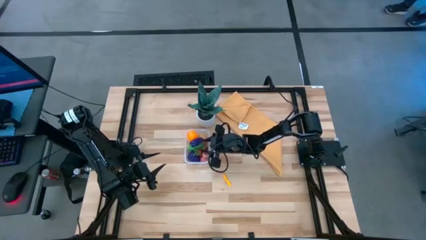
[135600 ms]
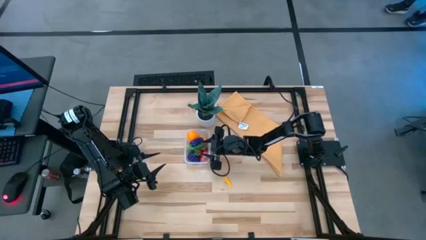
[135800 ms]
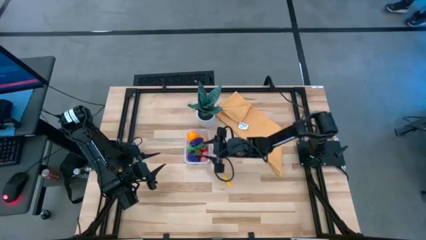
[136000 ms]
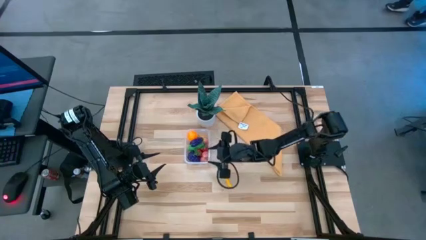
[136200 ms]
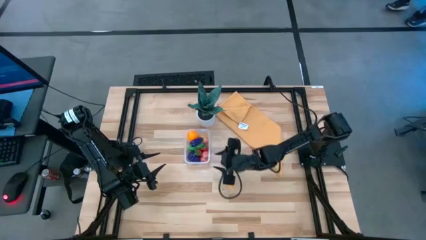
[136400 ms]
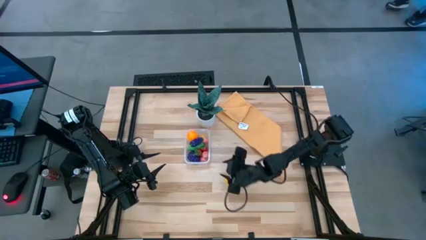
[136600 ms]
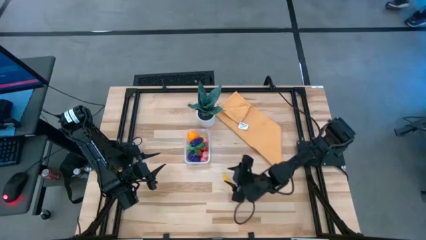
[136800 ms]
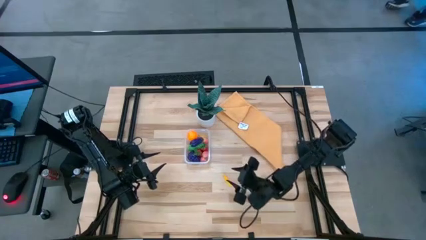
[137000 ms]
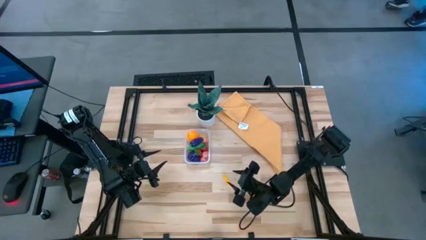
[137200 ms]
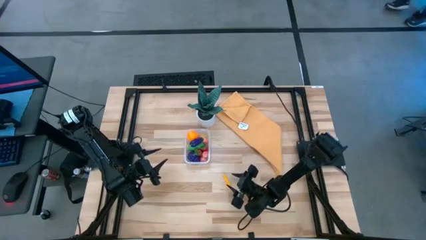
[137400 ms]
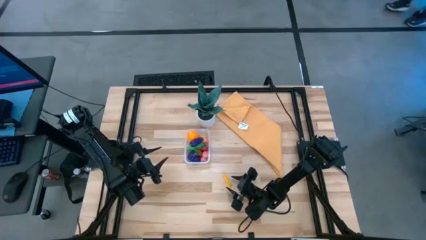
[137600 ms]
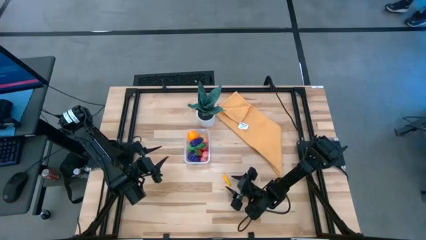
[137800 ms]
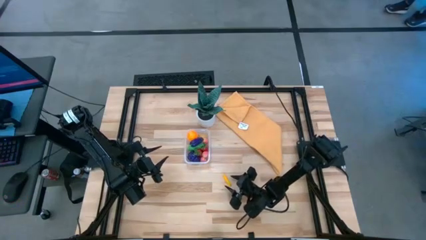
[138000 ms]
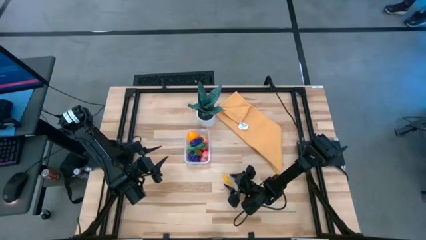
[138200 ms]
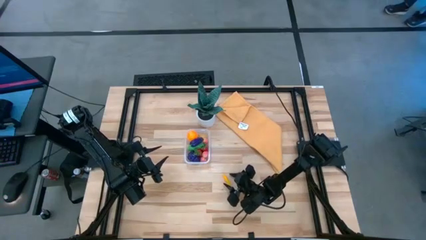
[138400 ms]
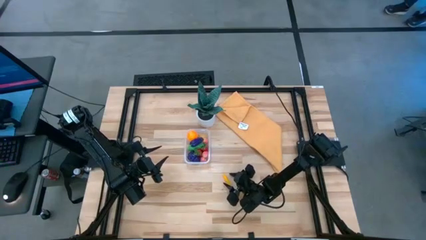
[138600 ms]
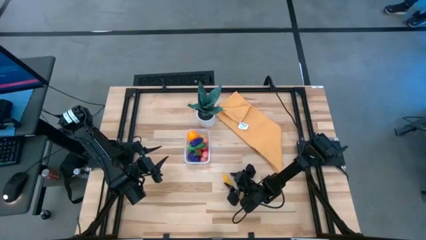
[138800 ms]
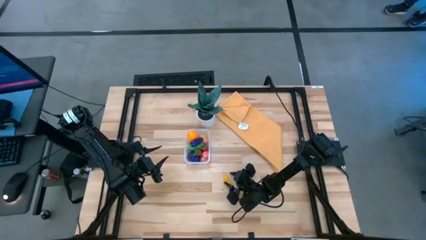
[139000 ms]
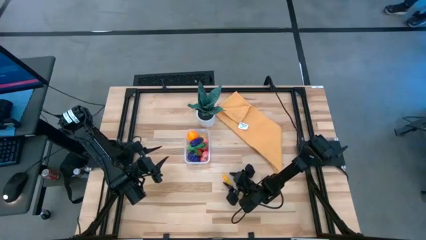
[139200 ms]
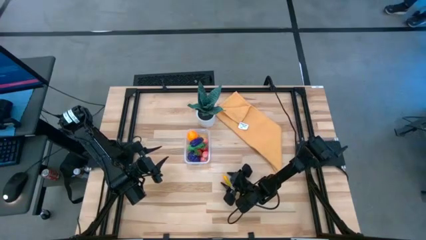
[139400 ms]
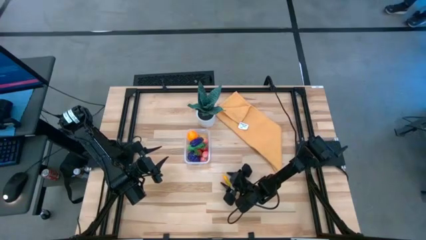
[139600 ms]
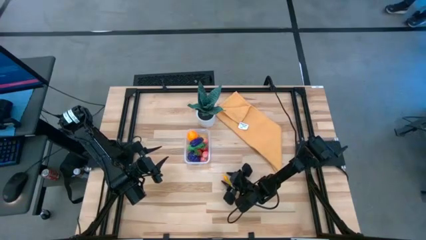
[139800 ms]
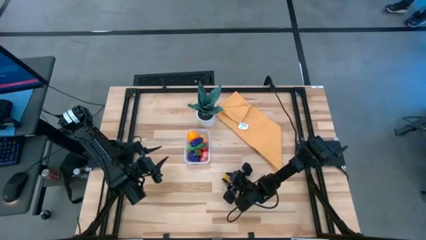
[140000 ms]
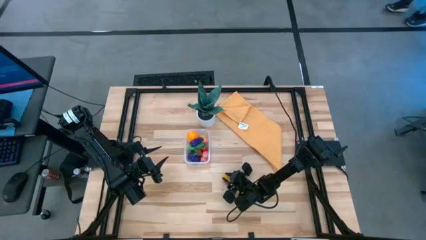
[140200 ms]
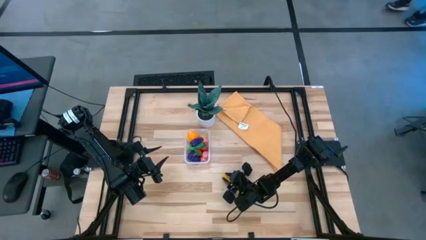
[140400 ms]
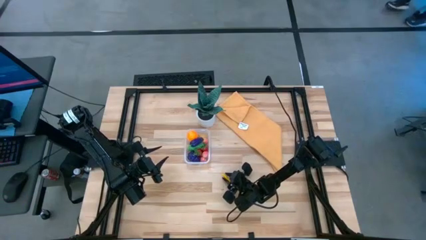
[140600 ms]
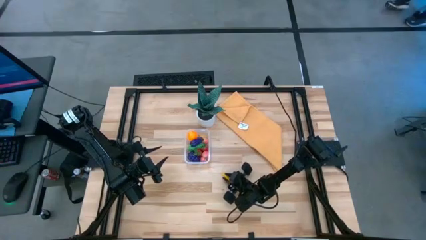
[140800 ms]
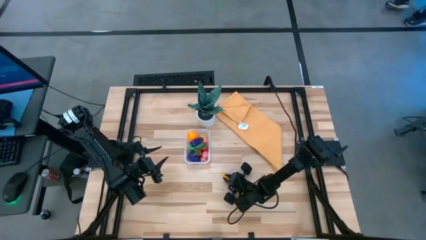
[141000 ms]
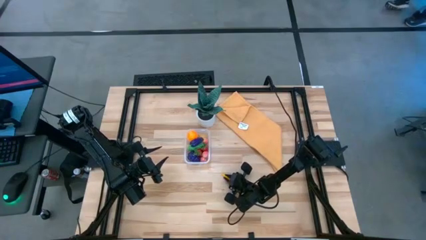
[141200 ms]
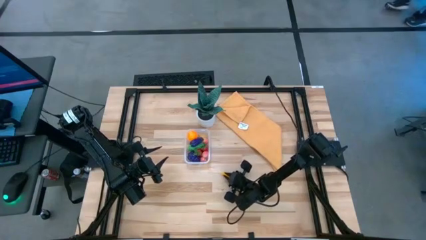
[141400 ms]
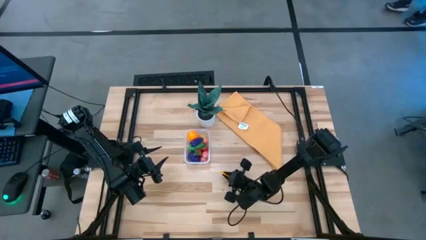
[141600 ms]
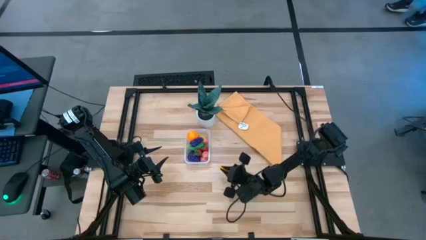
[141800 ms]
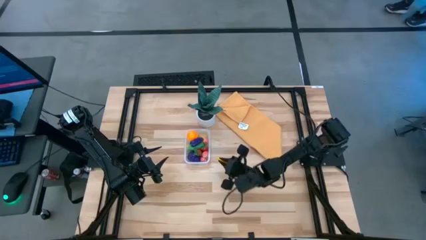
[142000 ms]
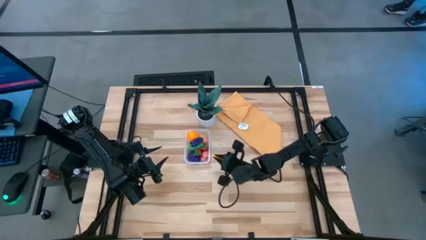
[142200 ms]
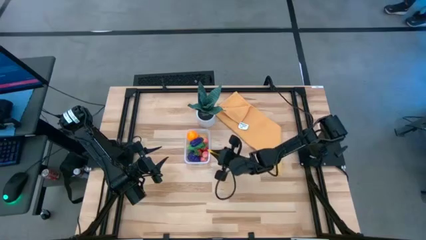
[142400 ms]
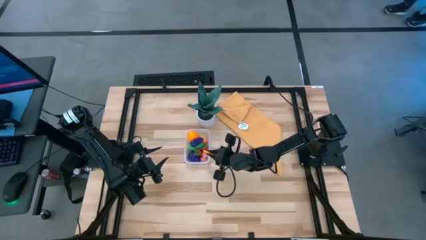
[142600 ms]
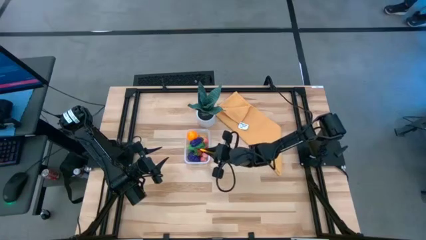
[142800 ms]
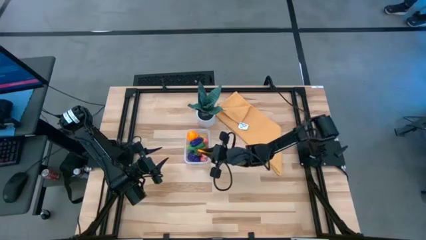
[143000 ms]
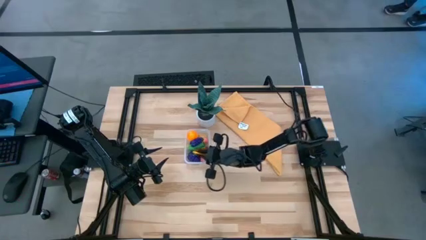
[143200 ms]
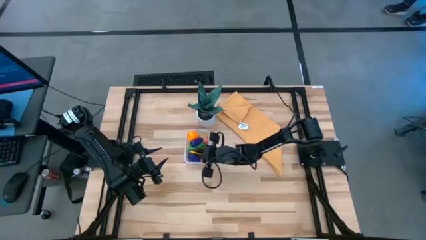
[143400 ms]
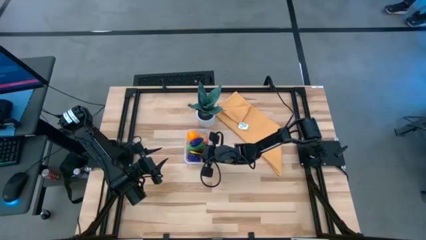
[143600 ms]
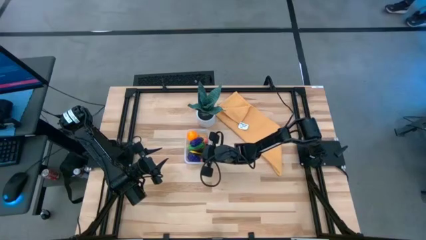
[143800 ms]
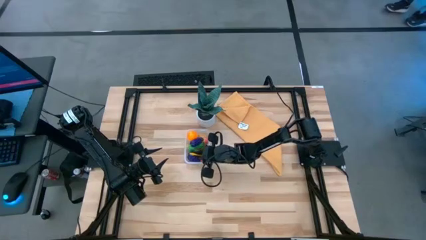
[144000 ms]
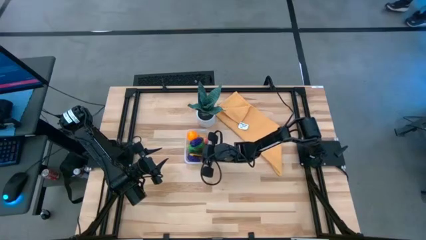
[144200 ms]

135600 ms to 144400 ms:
Task: Pick and placing Produce into tupperware
Put the yellow corn into the transparent bin

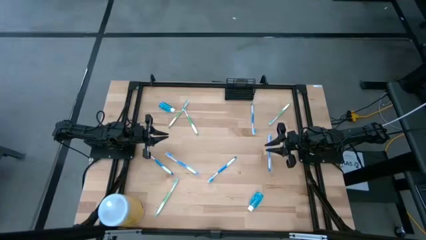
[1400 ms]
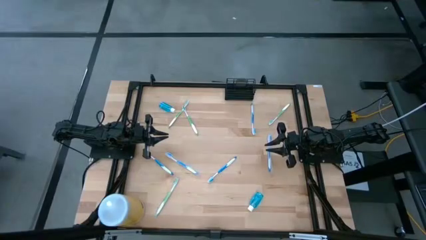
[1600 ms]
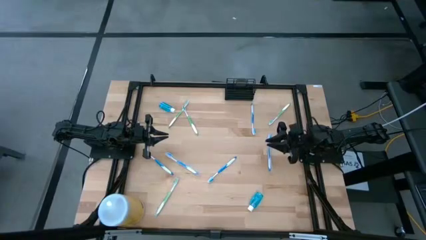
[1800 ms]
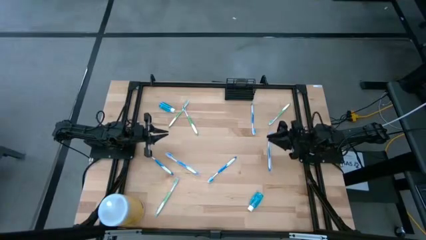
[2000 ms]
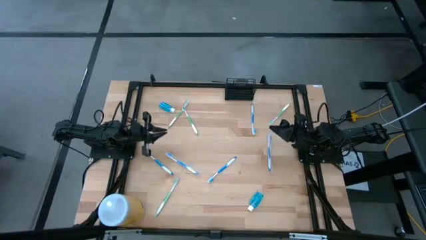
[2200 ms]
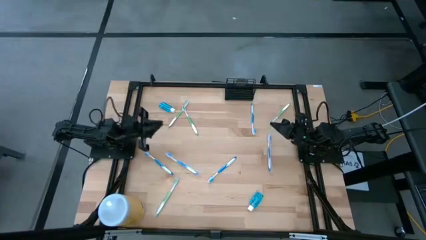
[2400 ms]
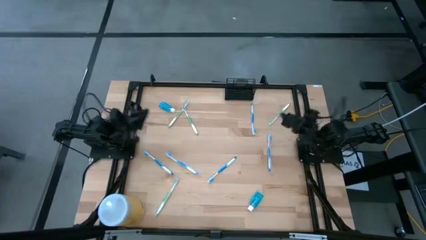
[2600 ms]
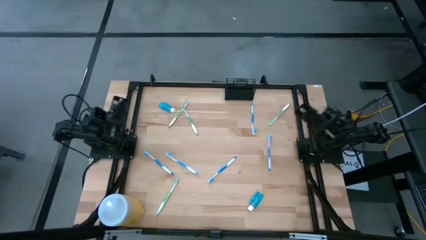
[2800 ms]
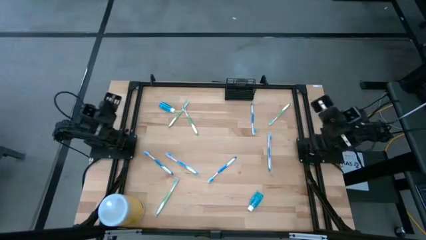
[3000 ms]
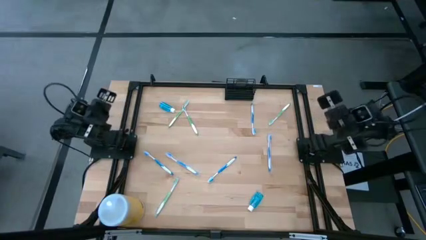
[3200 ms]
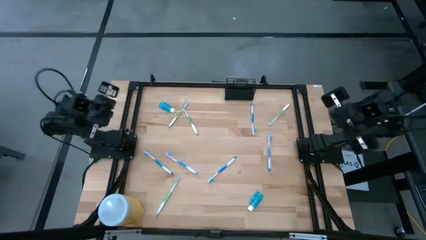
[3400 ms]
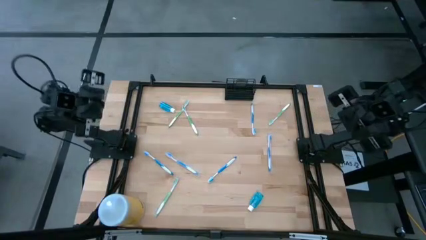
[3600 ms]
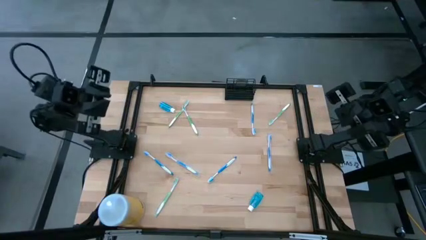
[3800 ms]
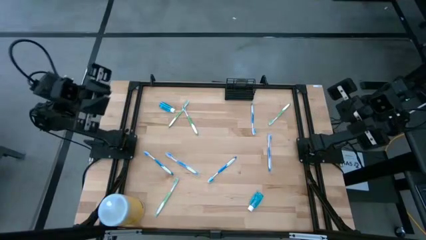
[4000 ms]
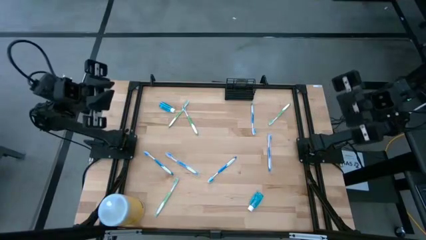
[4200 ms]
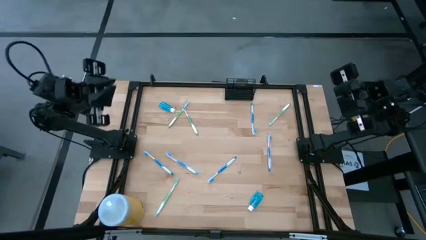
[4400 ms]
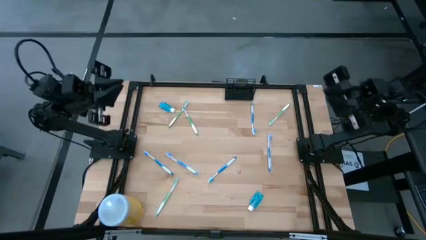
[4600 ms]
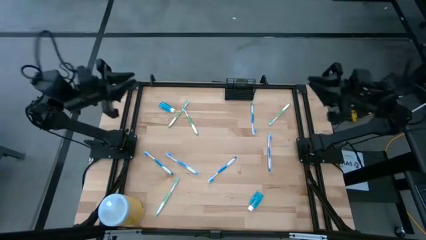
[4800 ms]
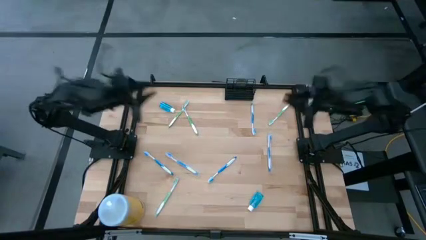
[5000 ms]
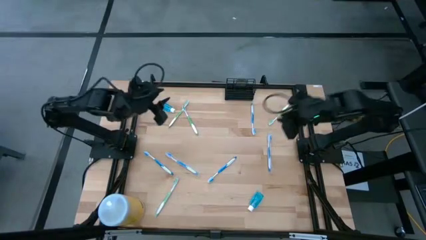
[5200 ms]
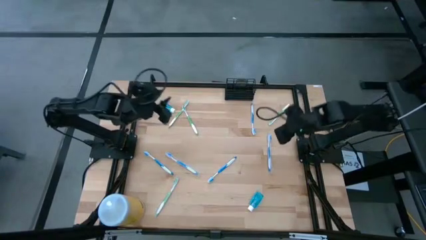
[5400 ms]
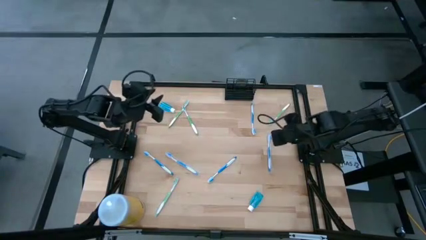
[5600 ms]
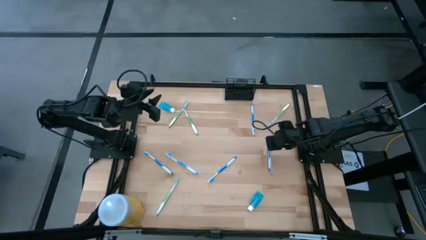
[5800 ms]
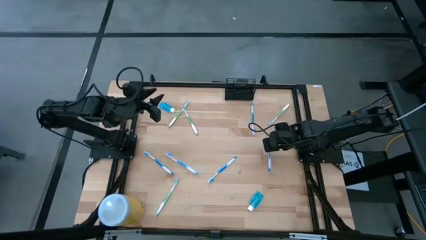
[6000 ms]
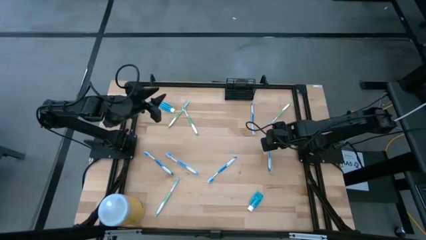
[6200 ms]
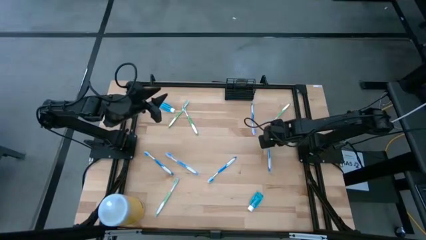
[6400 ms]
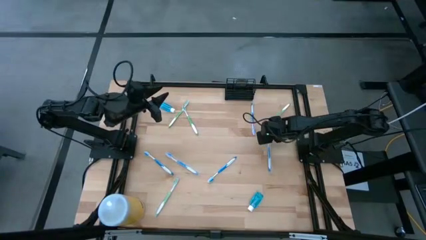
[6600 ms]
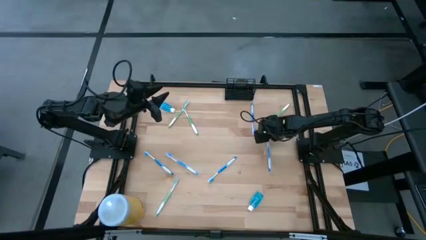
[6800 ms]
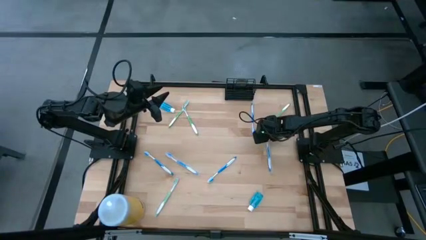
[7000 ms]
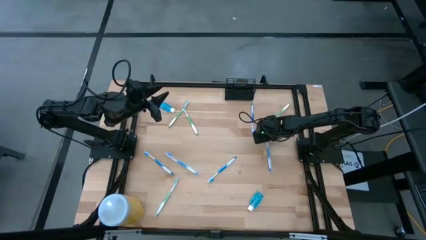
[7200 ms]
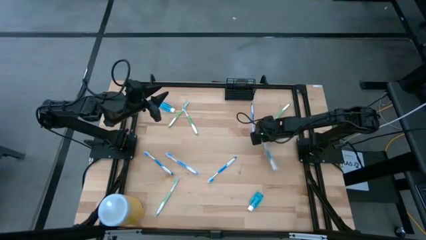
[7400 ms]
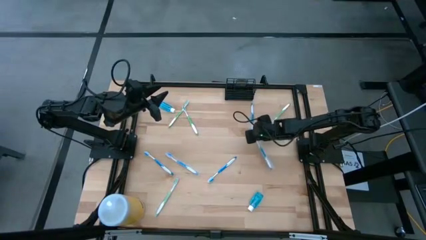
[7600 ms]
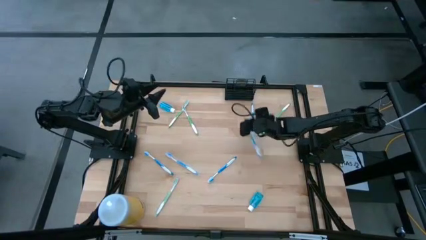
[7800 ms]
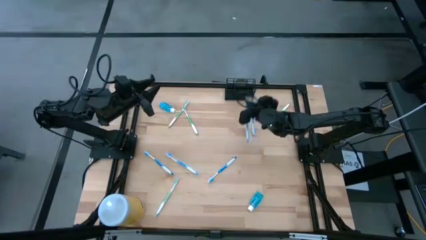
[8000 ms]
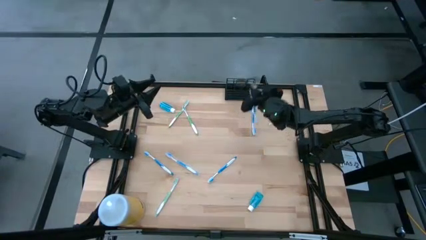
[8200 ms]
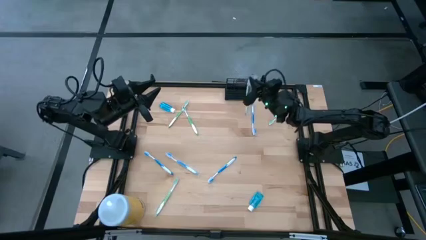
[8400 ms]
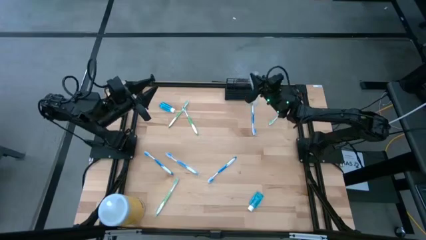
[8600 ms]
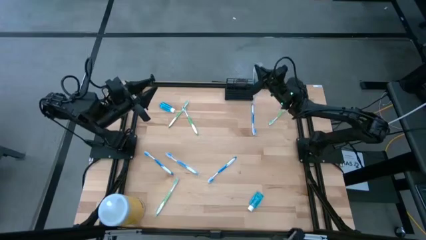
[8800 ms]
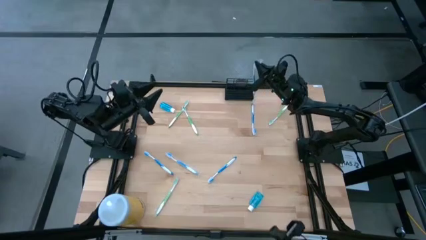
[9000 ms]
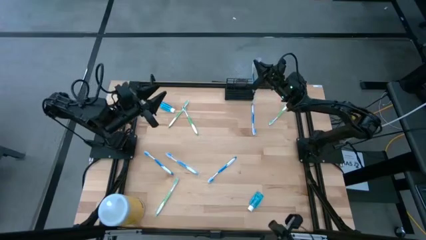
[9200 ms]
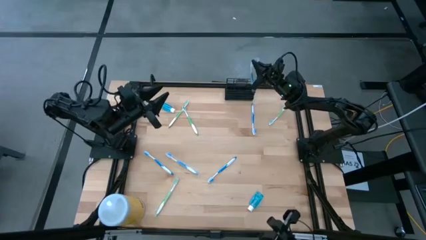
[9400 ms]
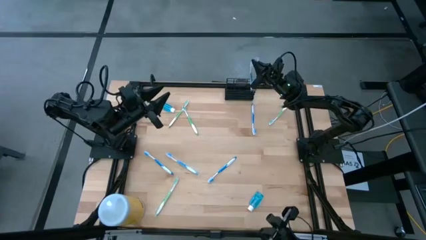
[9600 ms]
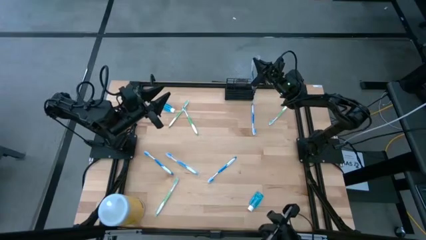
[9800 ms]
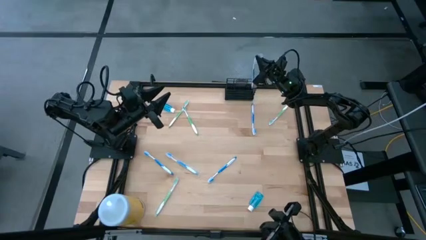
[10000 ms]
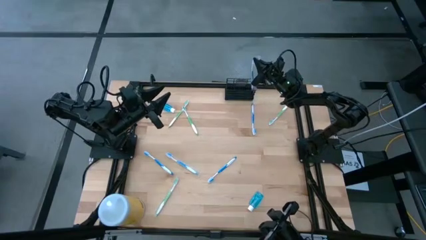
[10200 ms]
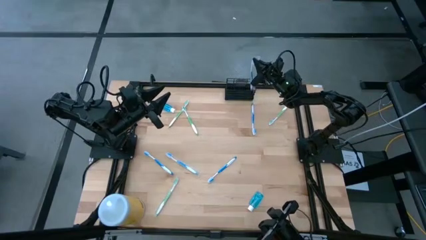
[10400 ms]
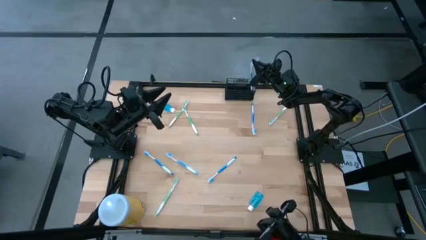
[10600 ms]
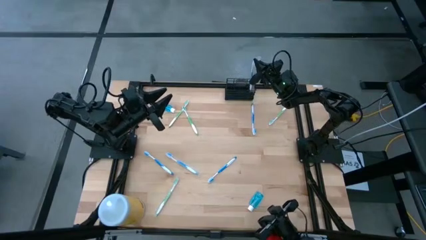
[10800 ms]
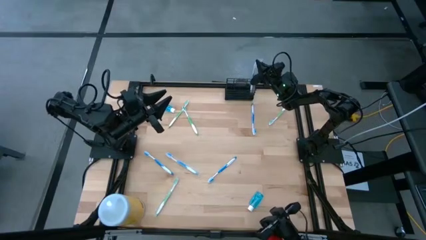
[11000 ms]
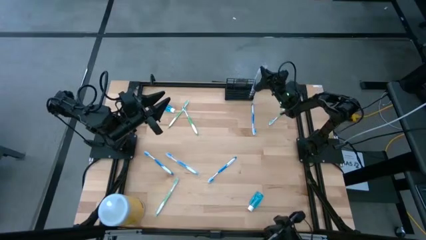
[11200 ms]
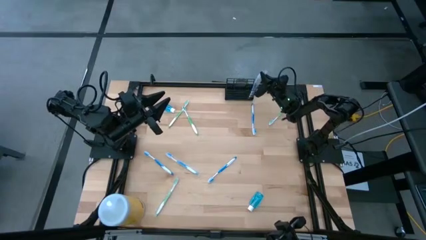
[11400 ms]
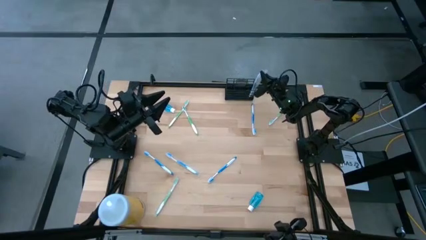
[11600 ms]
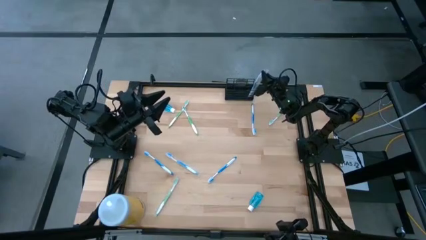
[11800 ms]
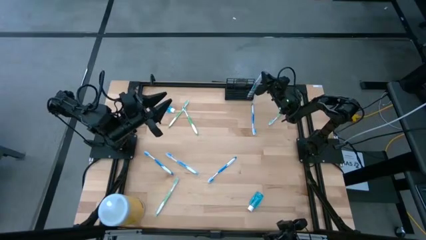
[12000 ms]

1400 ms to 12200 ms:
Task: Pick & Place toothbrushing station
Put the blue toothbrush into the black organizer
